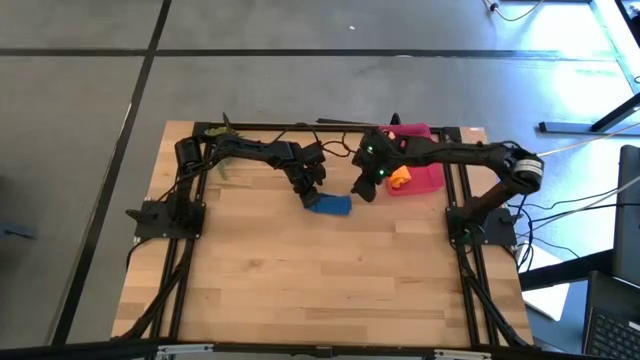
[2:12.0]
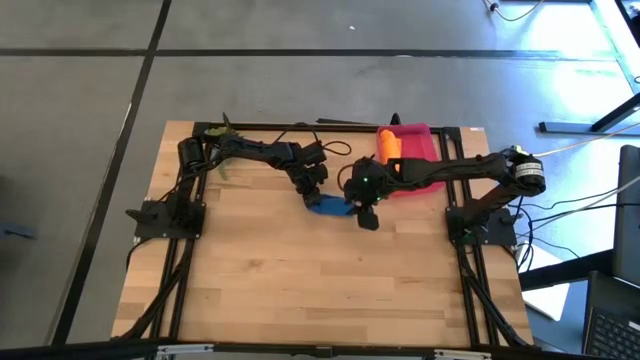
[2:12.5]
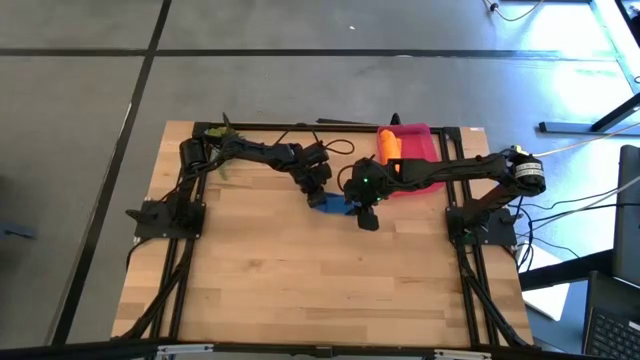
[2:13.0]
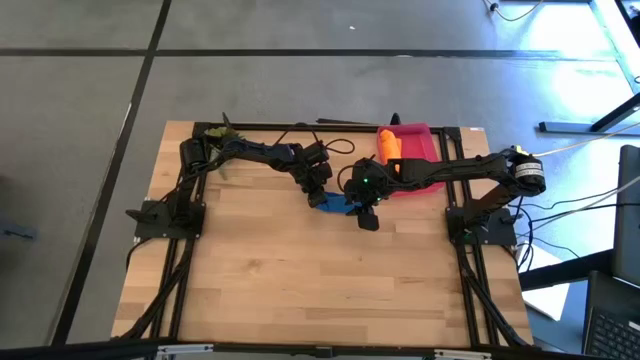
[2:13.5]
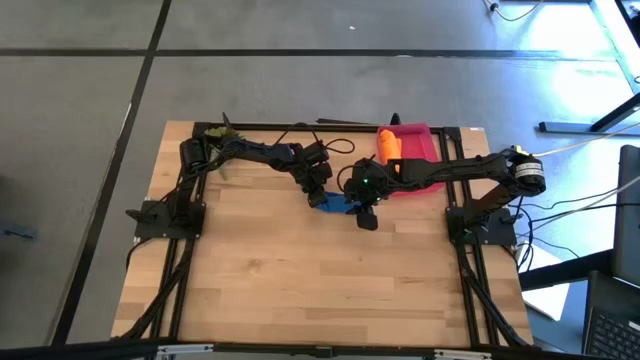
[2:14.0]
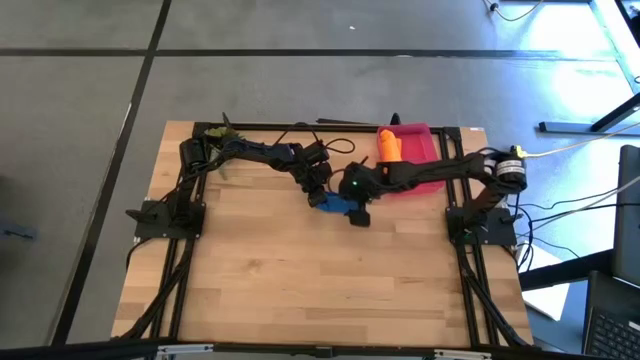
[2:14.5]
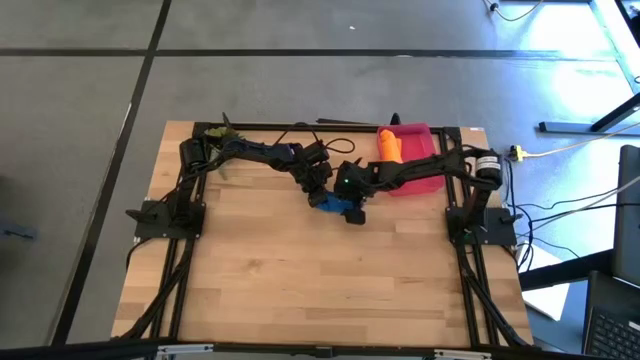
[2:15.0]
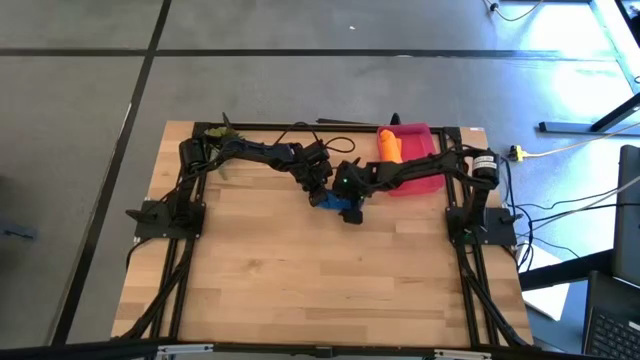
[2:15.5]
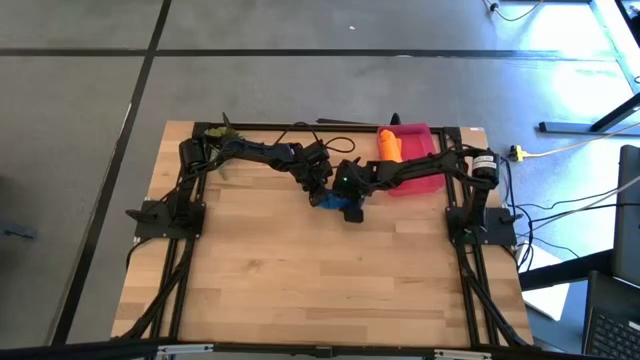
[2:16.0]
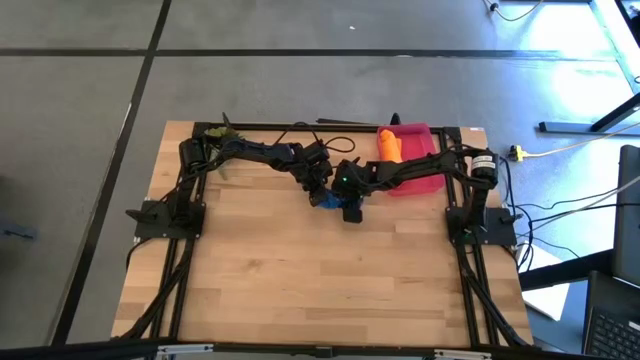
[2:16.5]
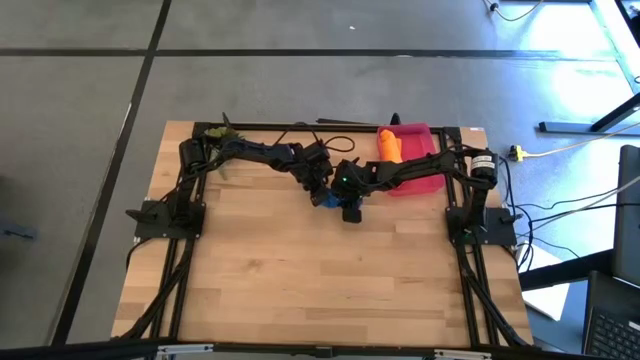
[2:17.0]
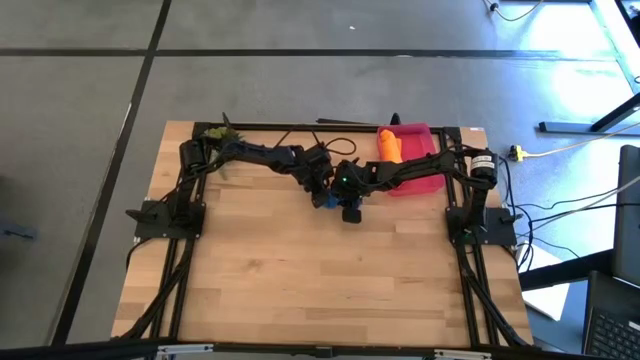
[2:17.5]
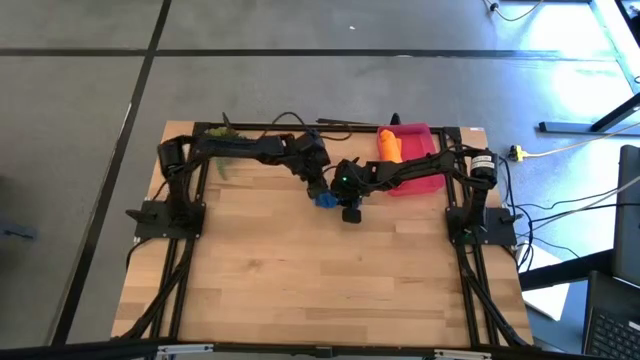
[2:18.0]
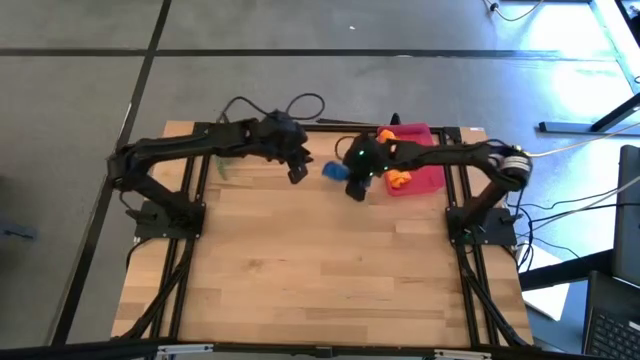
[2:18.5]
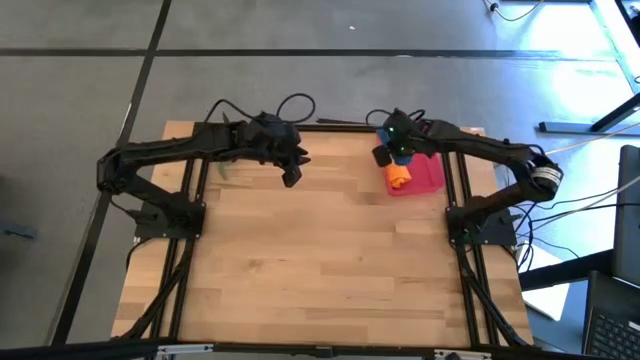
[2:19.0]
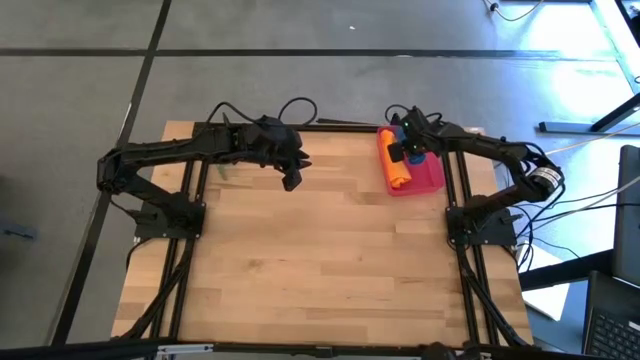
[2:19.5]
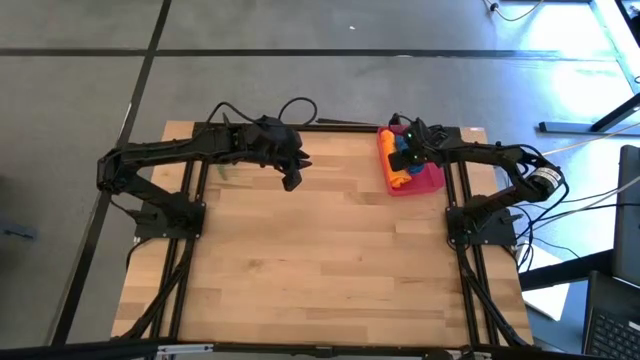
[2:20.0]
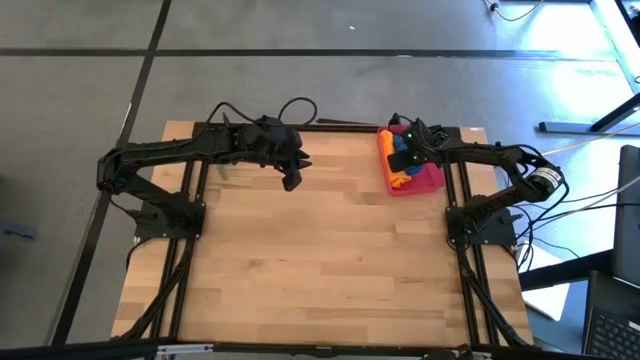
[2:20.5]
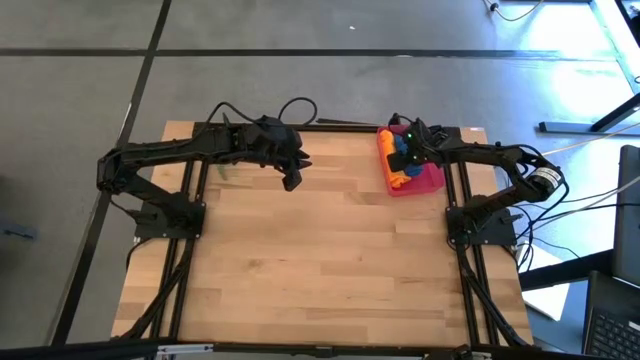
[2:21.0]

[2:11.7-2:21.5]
Task: Roll microfiber towels into tight, uniform cylinder then place into a basket
Put the rolled blue microfiber towel into the bin

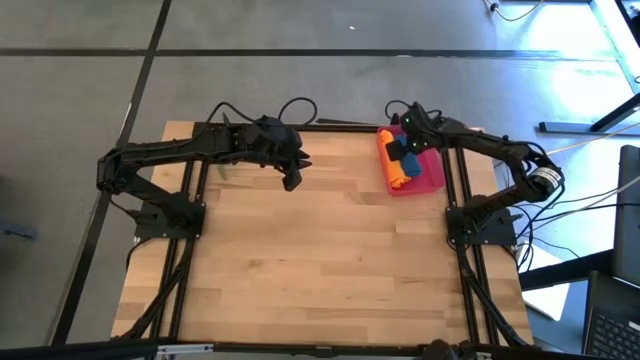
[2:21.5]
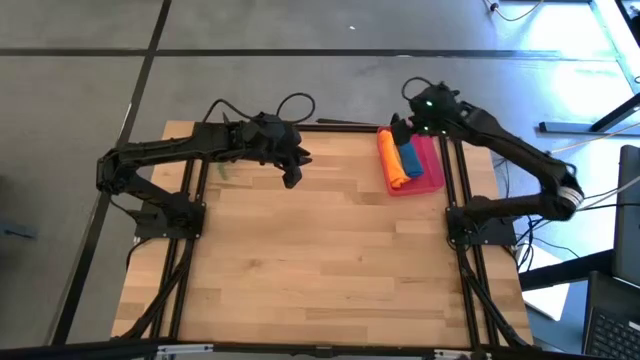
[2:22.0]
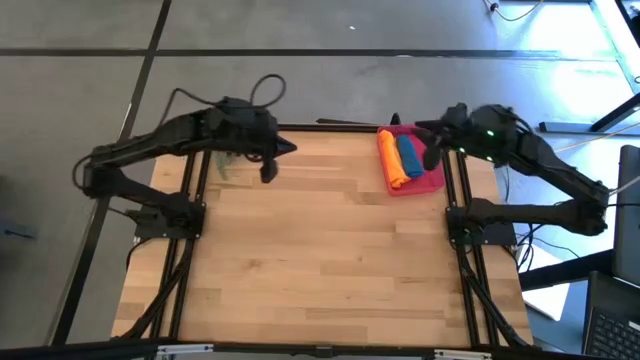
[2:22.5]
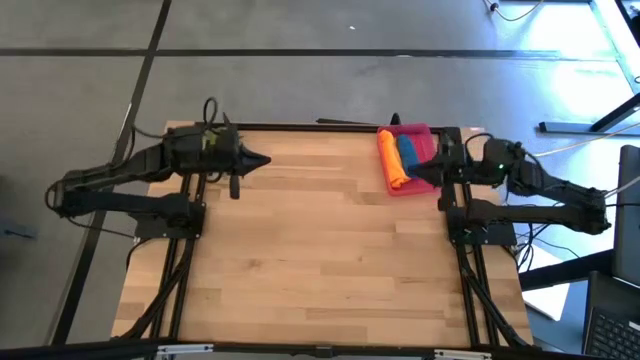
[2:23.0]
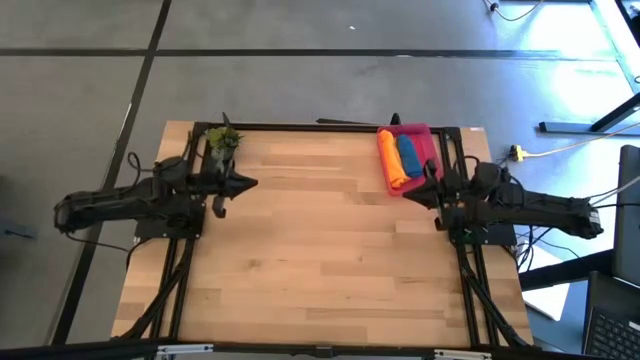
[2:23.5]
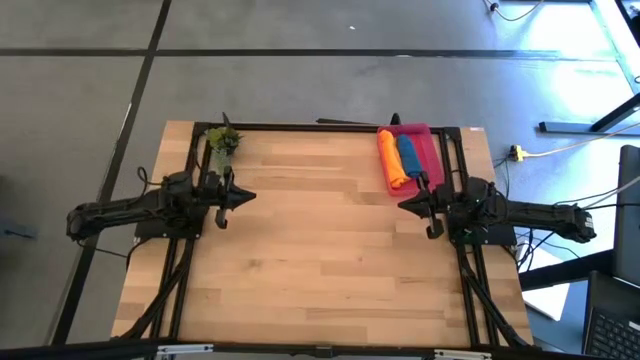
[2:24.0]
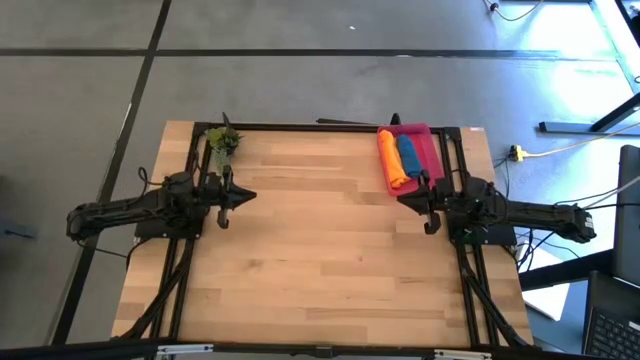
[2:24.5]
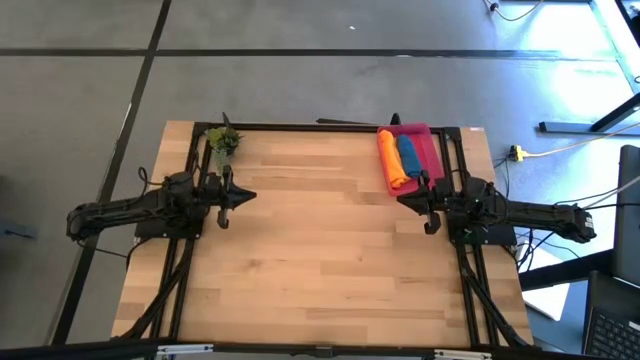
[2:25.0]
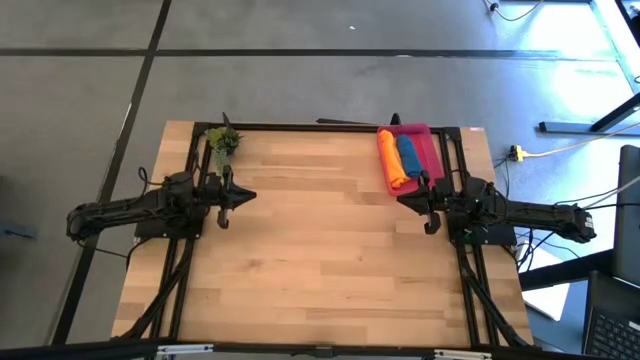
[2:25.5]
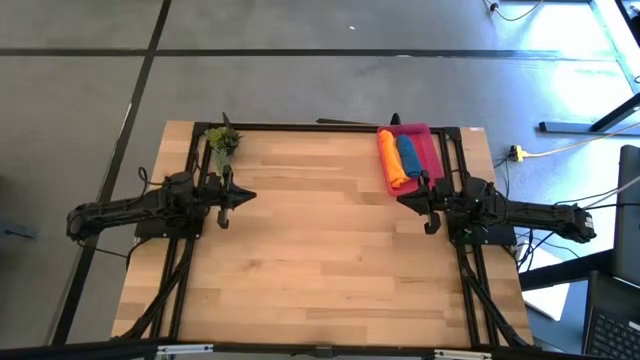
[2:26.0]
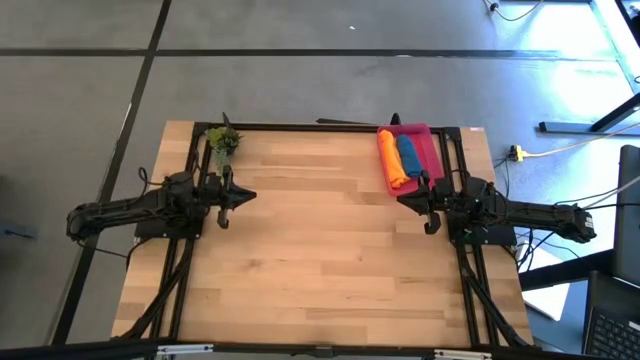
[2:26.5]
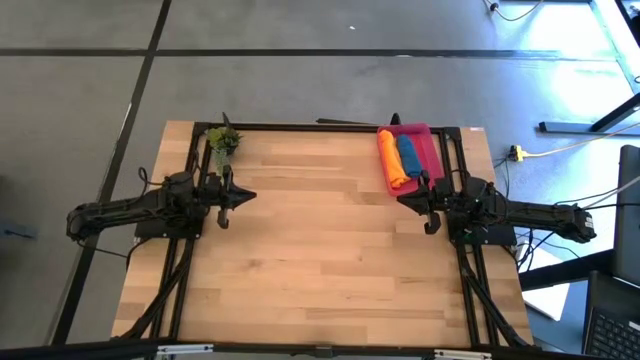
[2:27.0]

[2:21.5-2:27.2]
Return to Home Position

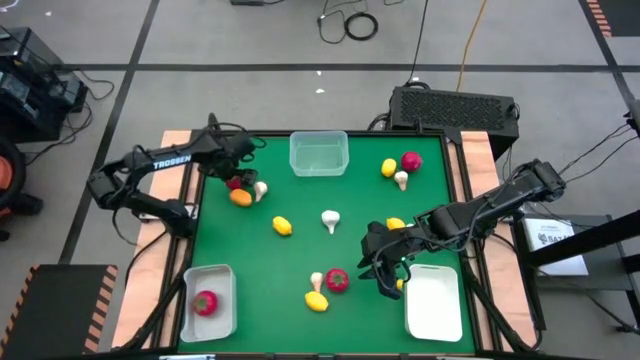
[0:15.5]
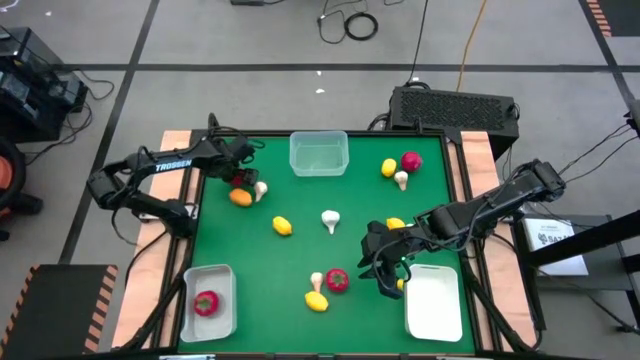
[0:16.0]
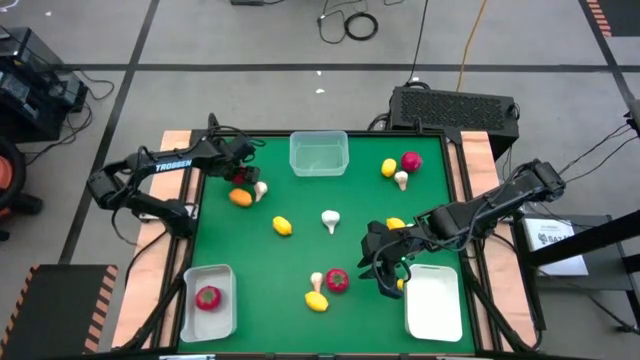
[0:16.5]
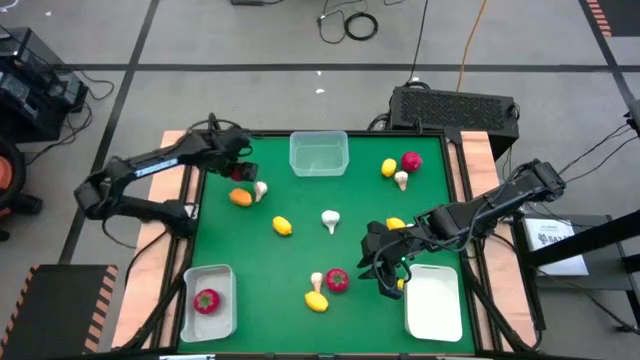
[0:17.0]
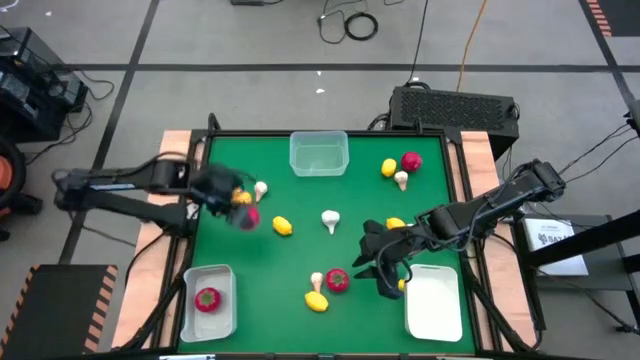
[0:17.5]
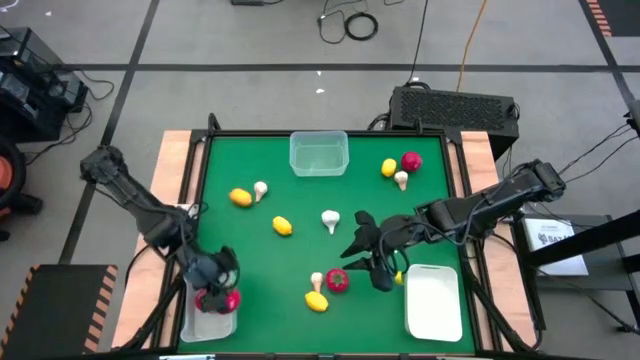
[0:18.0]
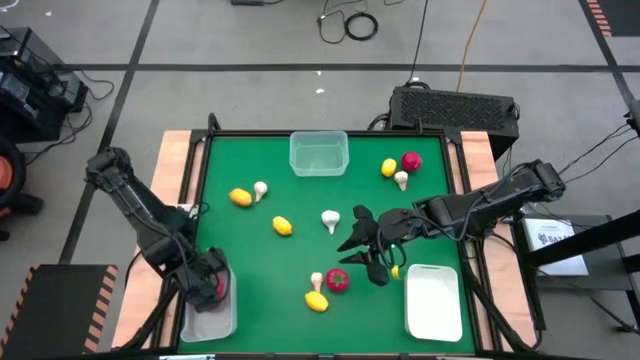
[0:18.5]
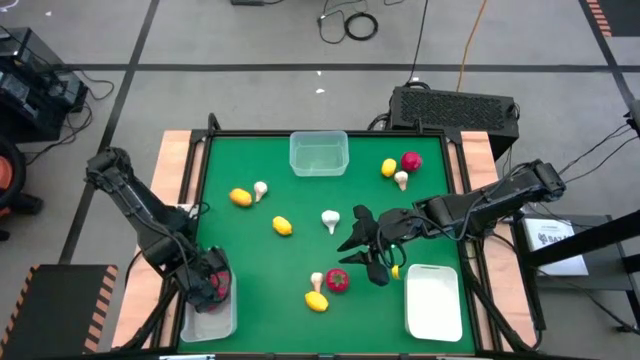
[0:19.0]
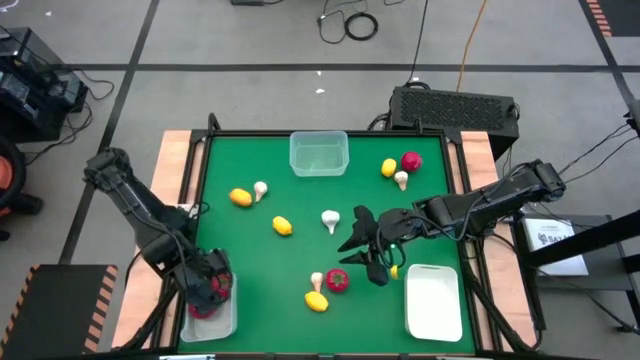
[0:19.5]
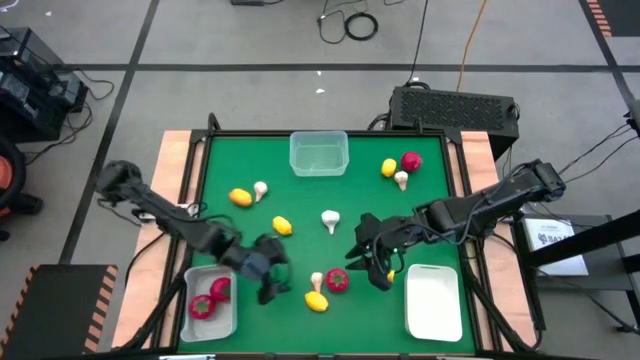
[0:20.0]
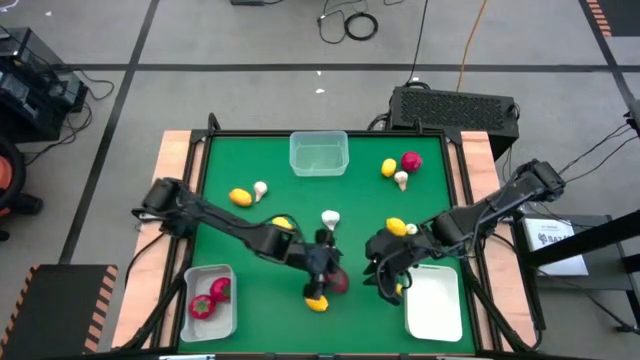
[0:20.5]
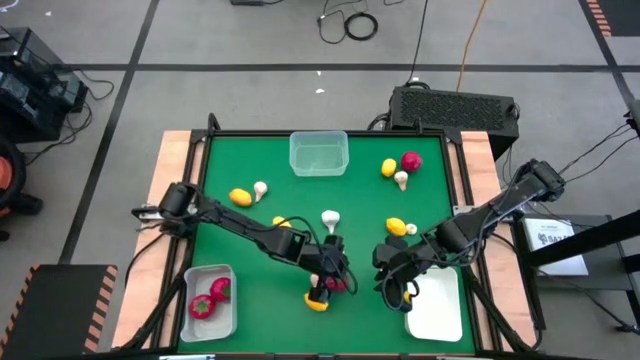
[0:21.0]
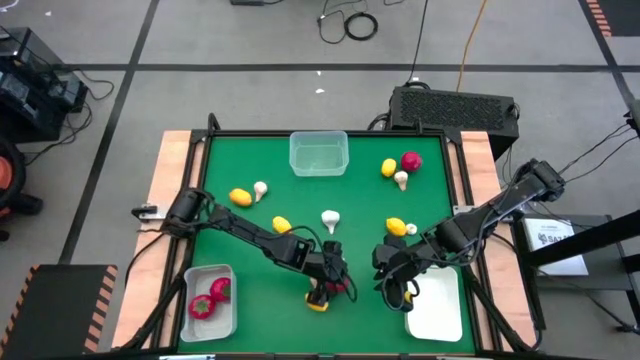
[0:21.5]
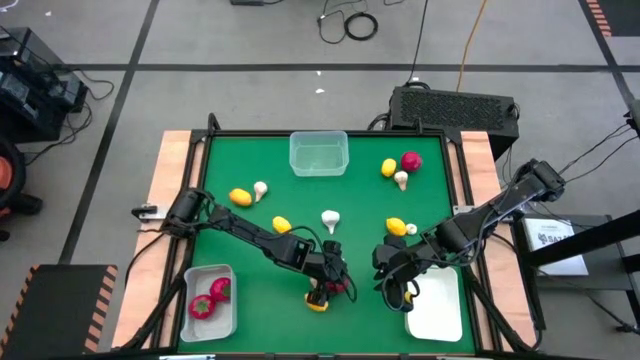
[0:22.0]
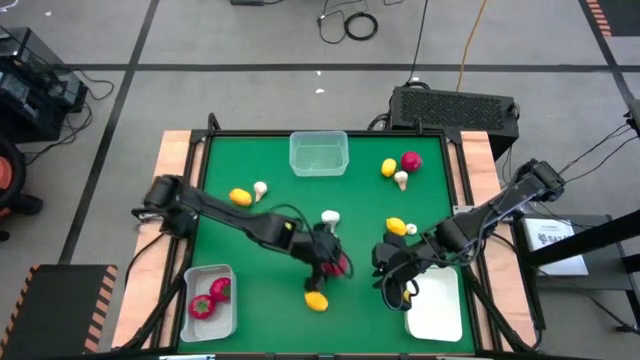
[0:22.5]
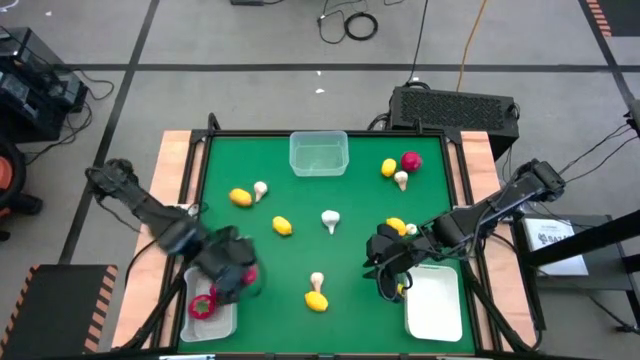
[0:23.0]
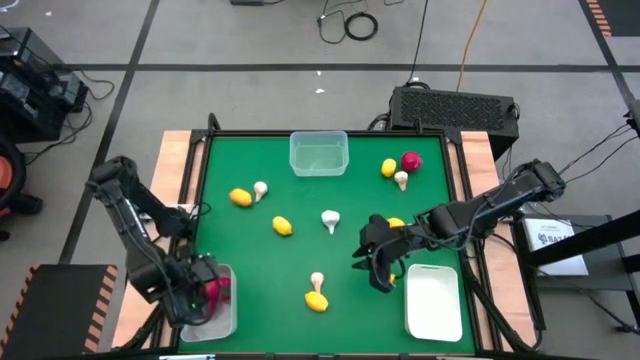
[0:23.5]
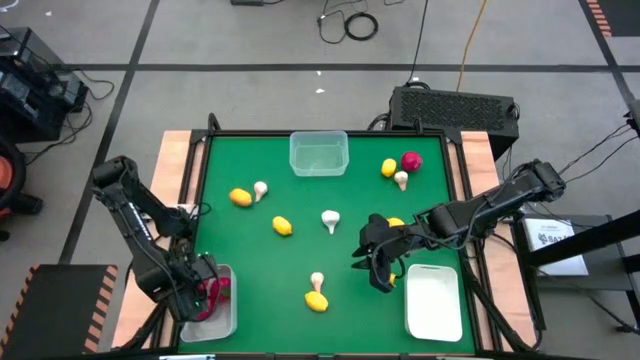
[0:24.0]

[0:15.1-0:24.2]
Task: Sort produce into baskets
Put the tomato into the gray bin
